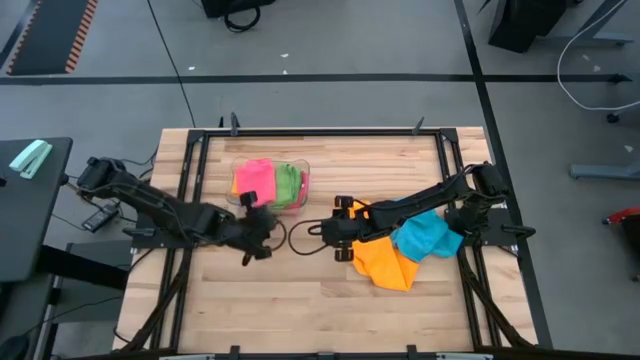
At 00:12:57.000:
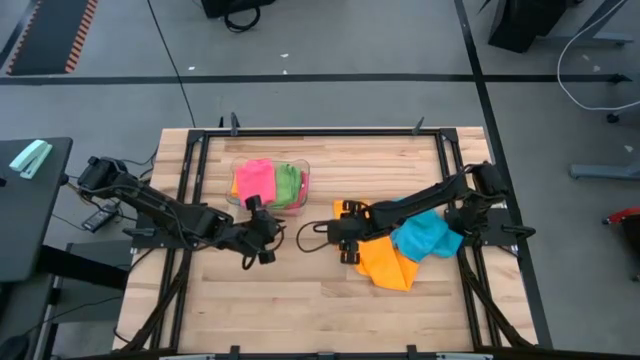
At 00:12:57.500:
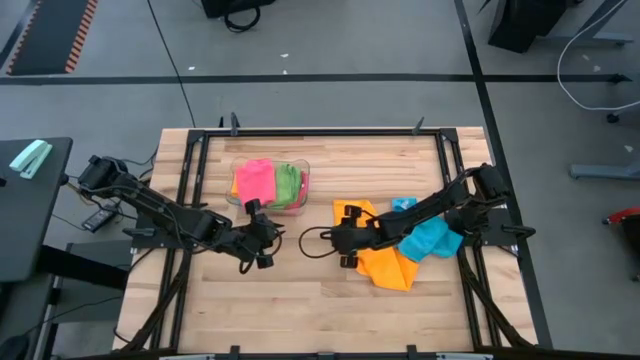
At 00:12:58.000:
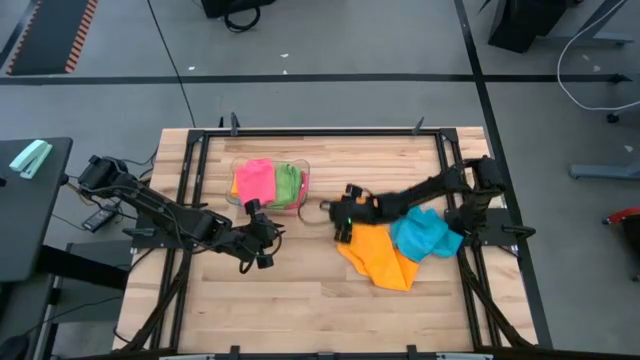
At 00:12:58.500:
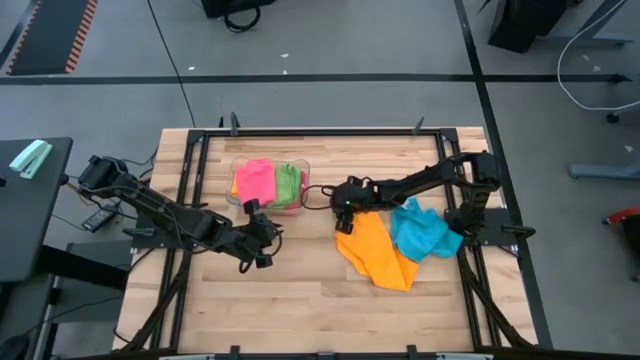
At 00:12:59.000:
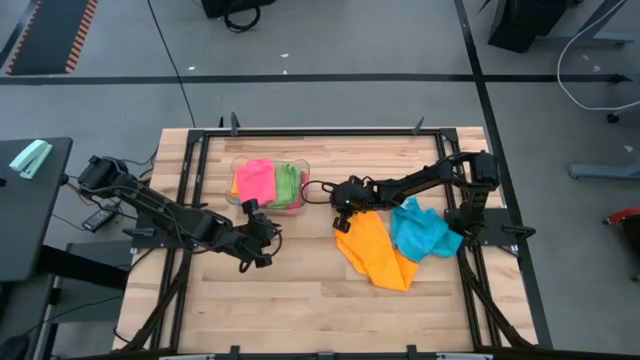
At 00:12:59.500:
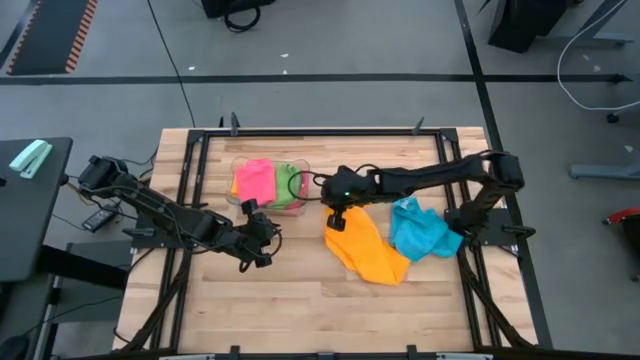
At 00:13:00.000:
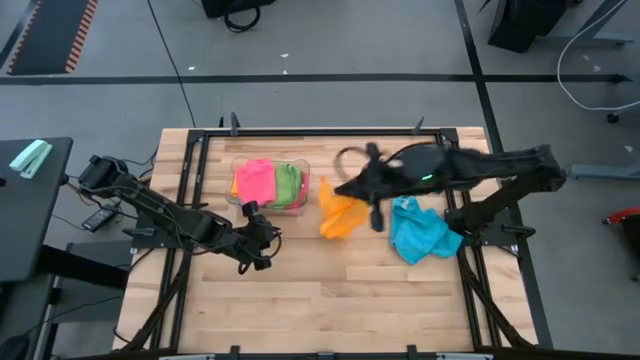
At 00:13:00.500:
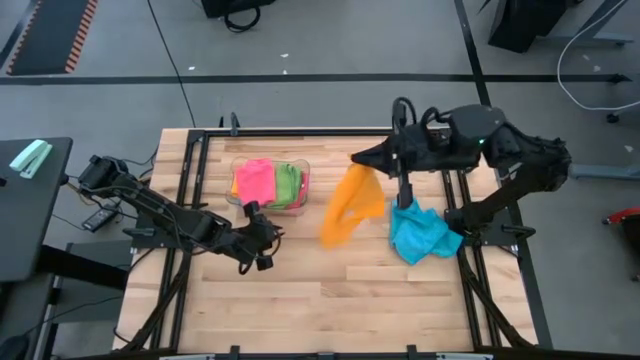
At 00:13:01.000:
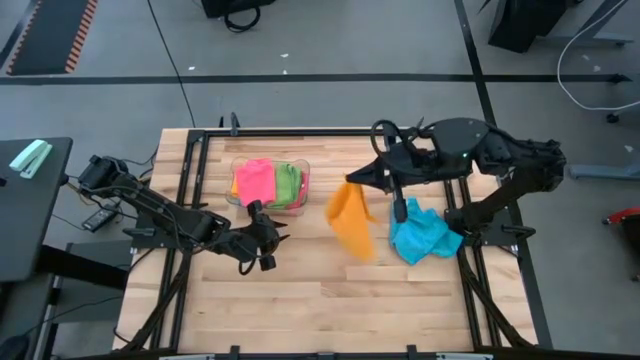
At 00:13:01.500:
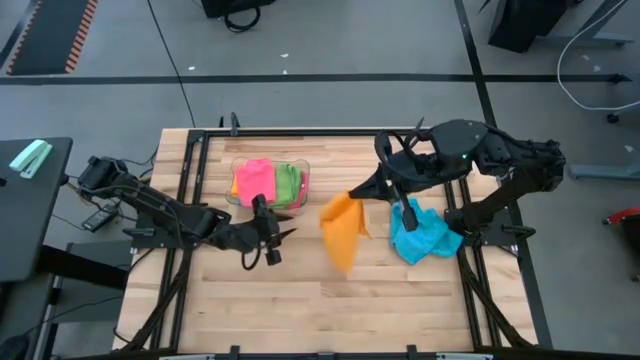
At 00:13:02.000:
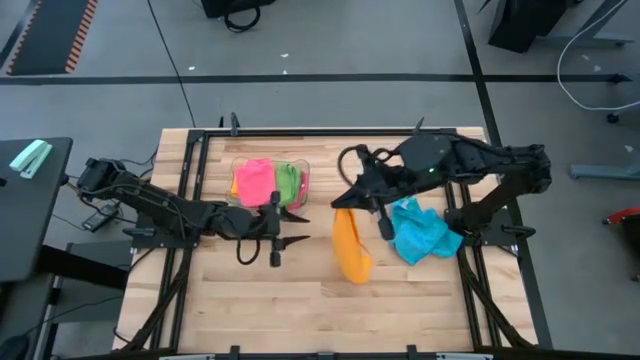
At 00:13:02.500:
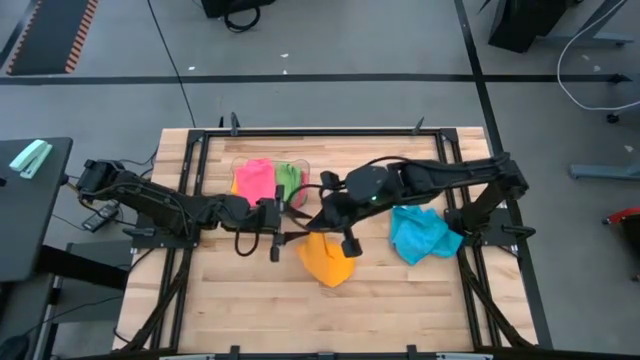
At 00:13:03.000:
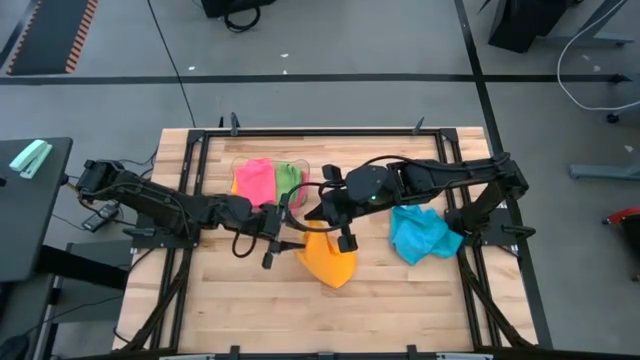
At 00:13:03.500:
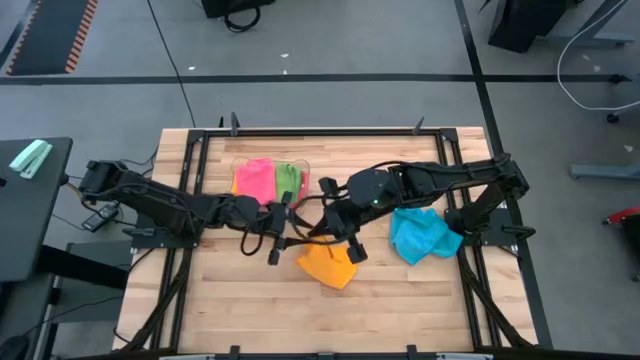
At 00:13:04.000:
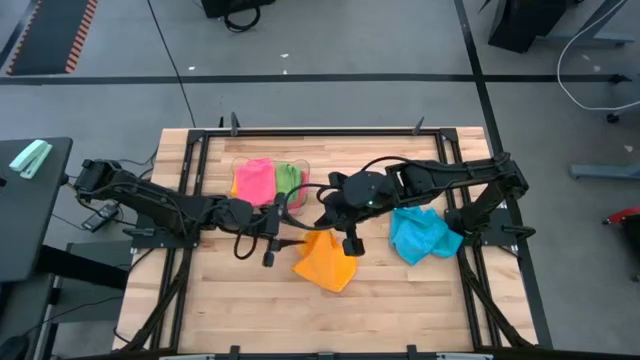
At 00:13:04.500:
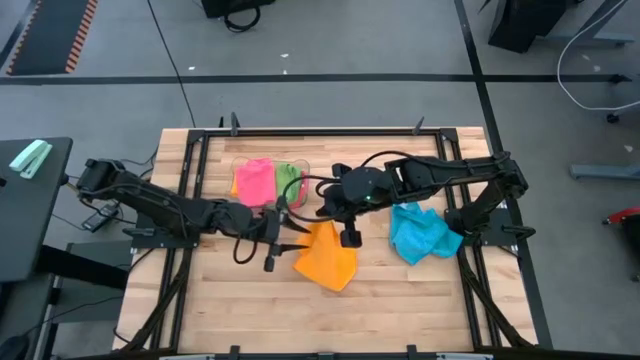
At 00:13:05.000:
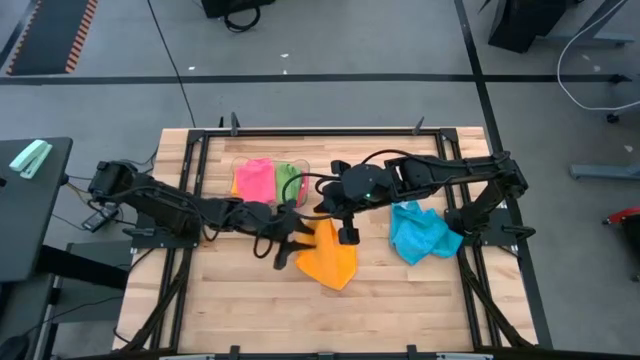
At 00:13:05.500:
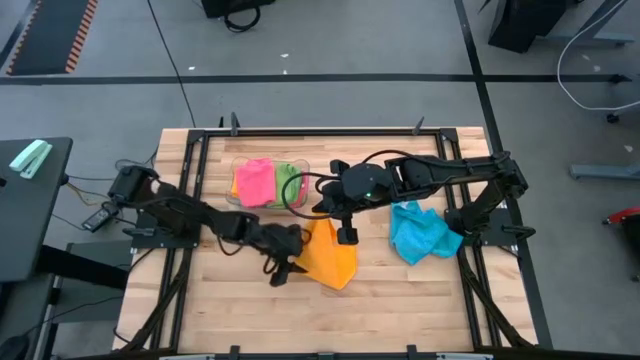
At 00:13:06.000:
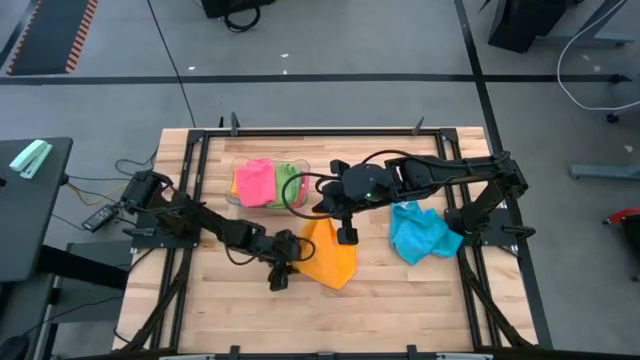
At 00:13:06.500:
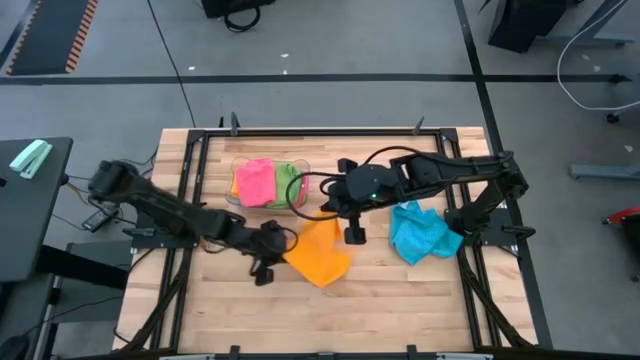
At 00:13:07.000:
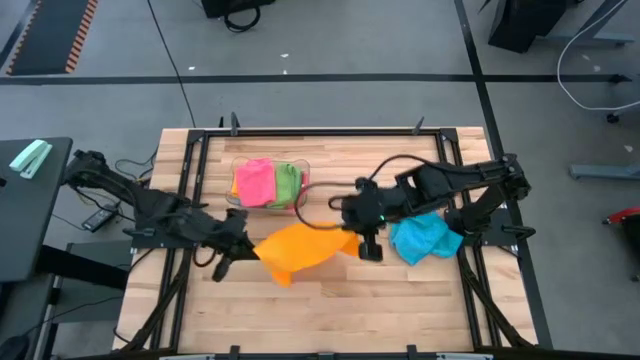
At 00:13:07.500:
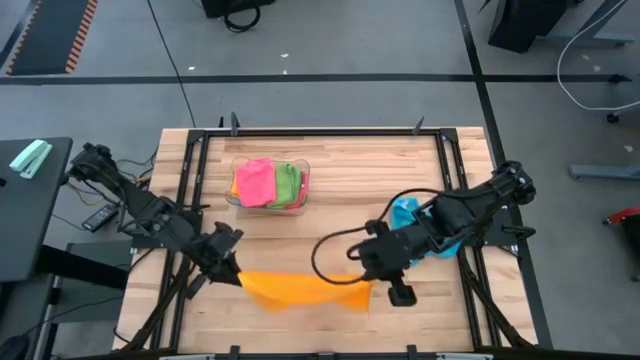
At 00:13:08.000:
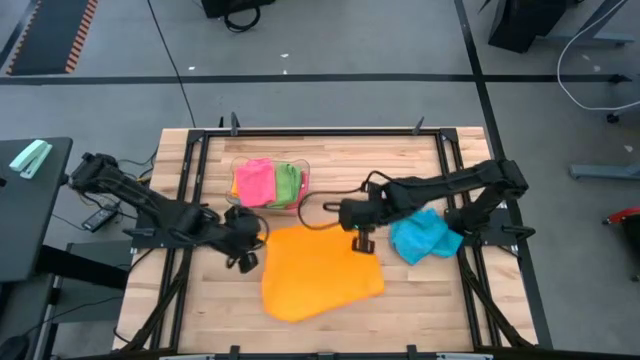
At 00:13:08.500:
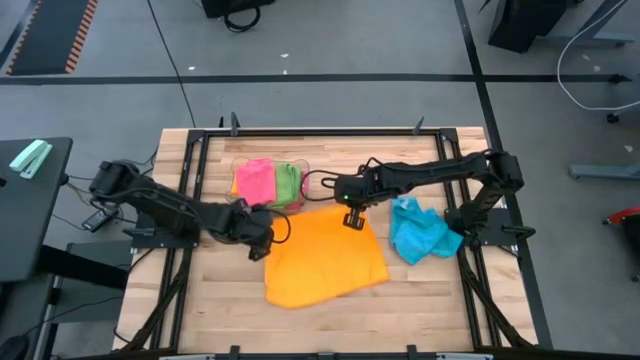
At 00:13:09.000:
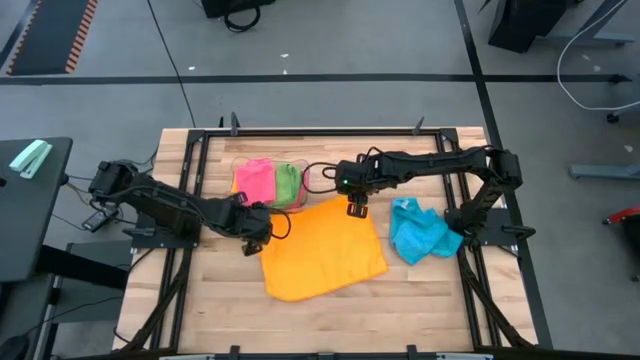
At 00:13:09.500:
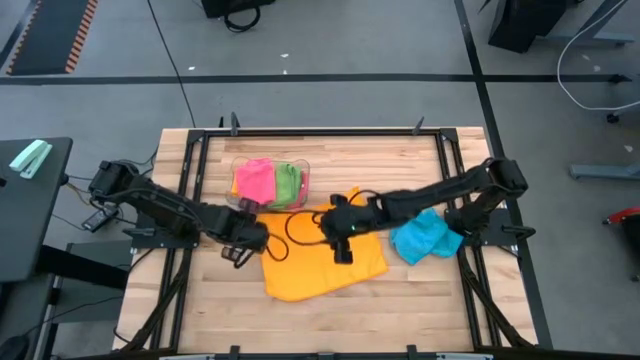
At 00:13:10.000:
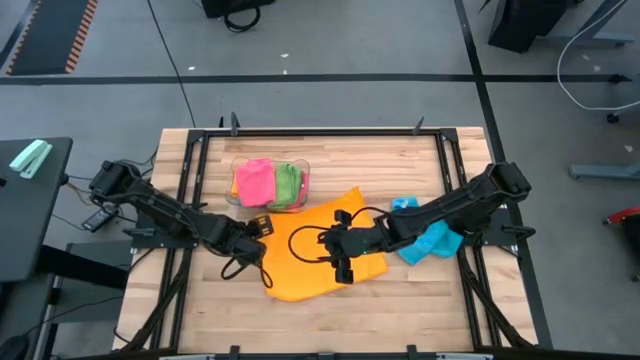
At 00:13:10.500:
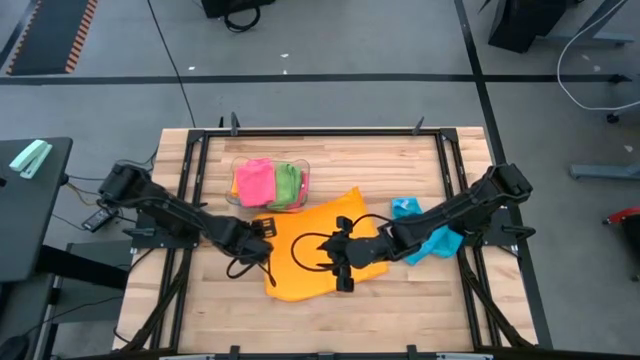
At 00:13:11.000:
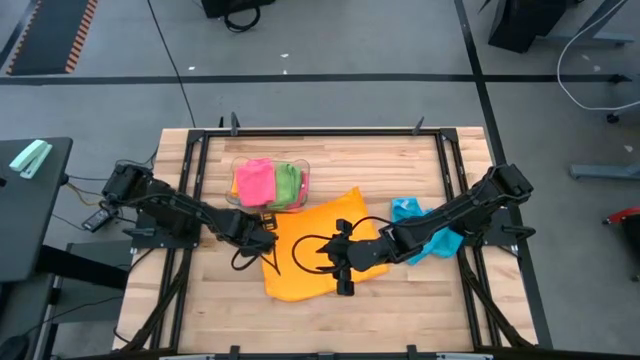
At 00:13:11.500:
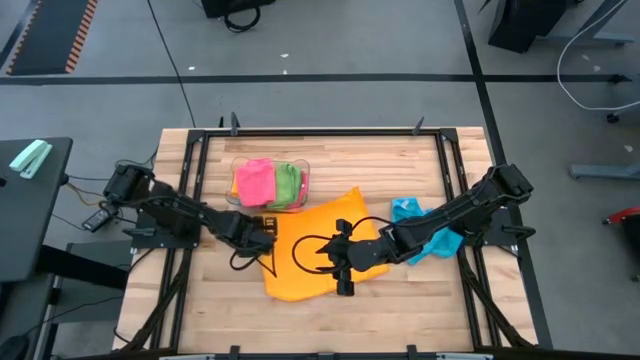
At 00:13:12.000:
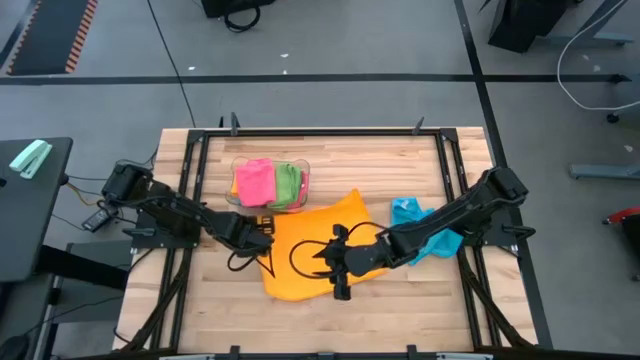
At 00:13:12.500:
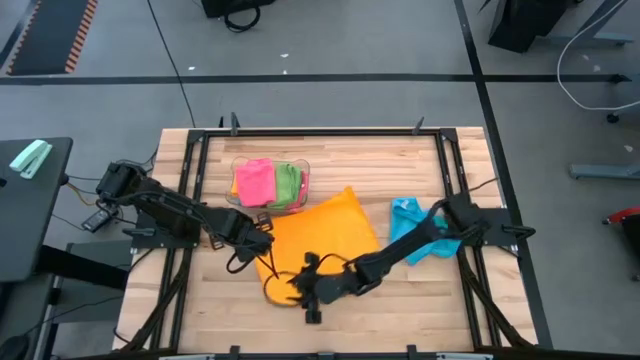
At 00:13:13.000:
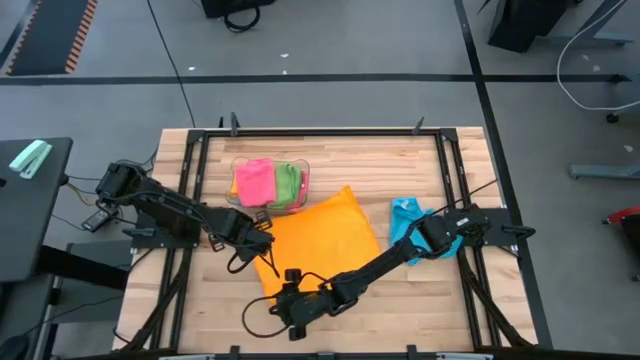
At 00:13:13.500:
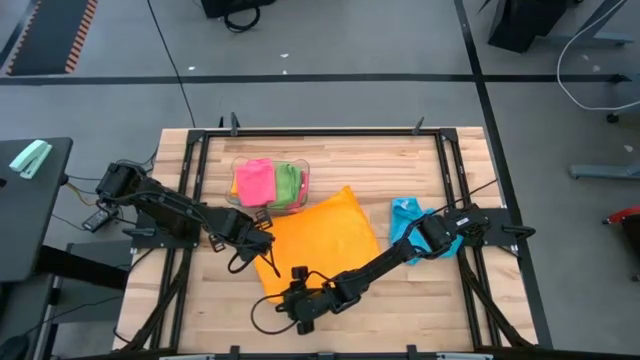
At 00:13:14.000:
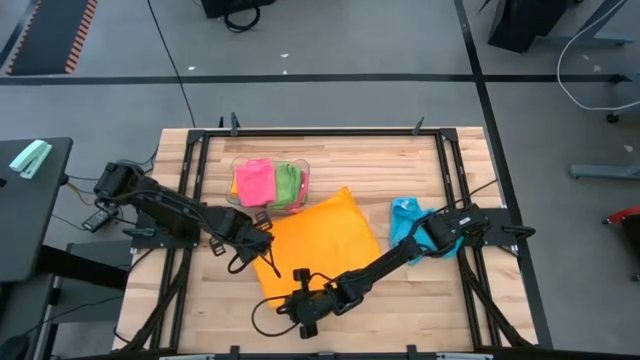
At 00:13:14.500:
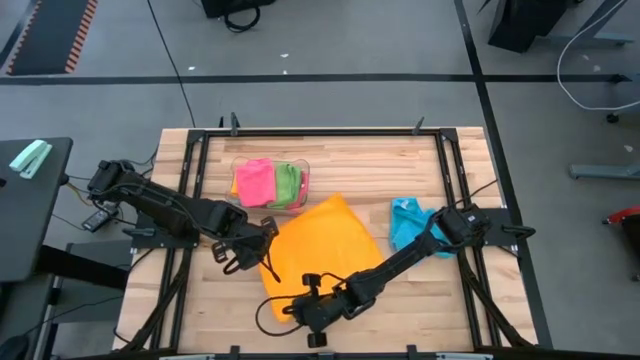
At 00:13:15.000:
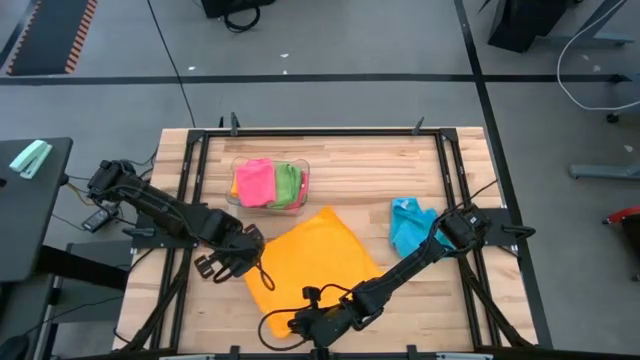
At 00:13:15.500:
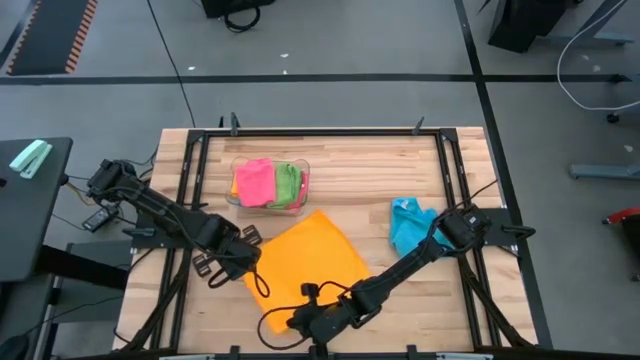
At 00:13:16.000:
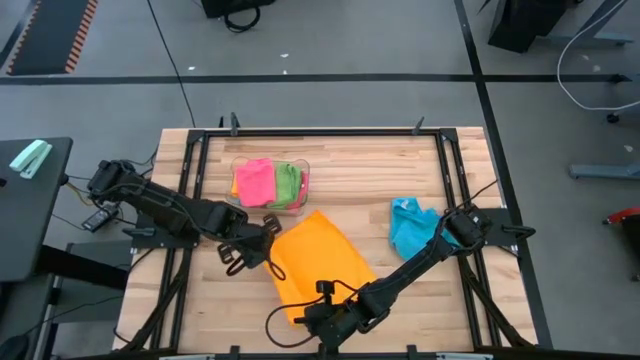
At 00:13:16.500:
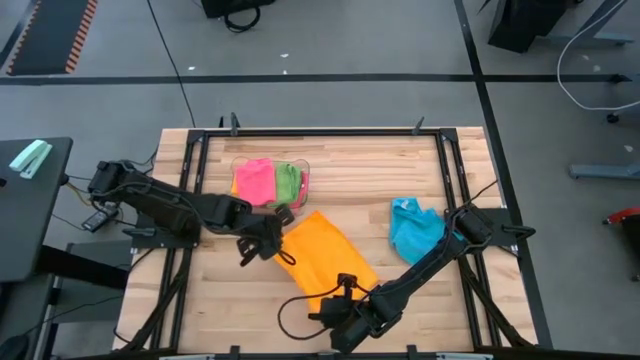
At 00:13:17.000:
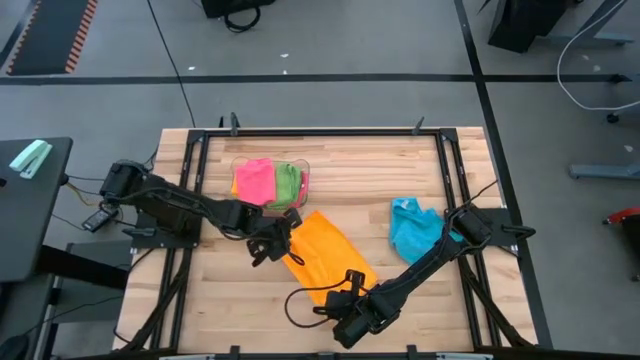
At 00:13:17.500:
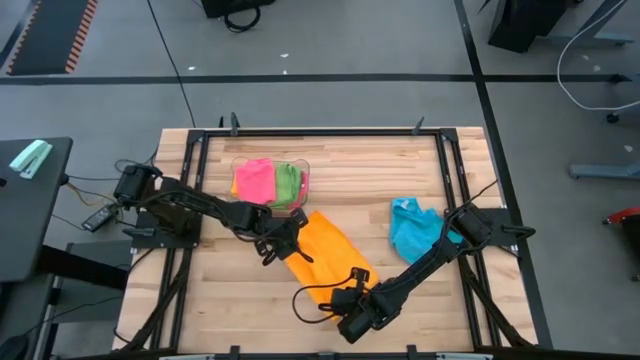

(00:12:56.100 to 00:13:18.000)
Task: Fold microfiber towels
Fold the orange microfiber towel
